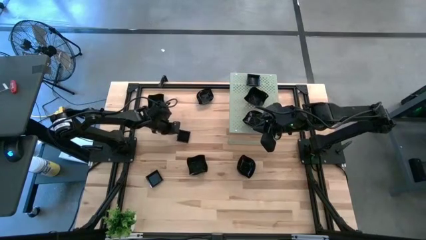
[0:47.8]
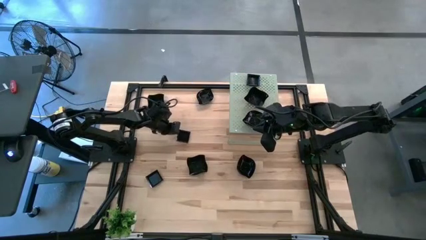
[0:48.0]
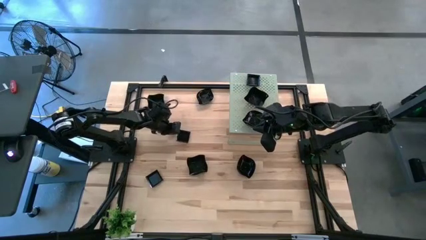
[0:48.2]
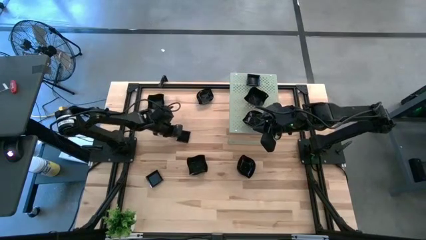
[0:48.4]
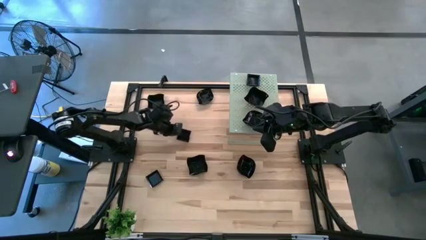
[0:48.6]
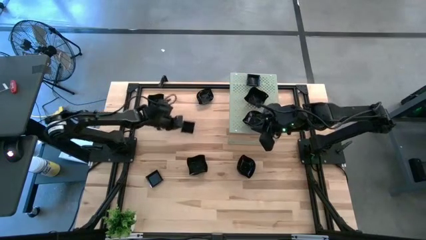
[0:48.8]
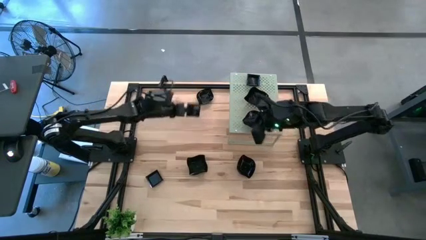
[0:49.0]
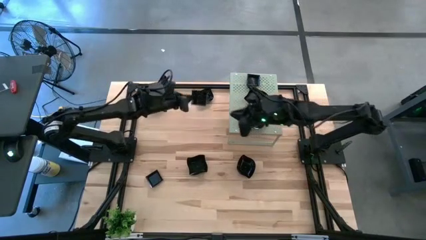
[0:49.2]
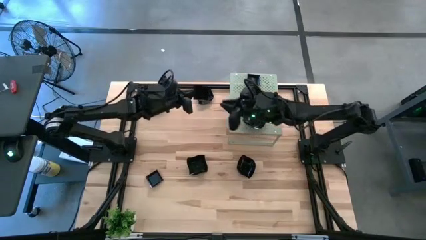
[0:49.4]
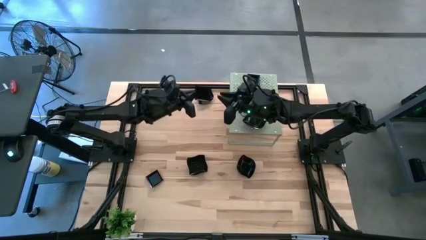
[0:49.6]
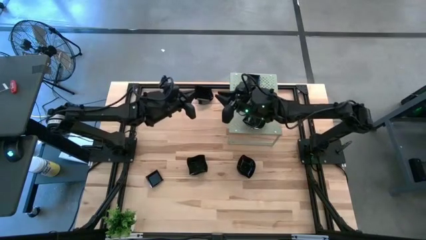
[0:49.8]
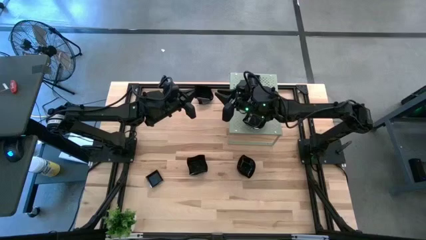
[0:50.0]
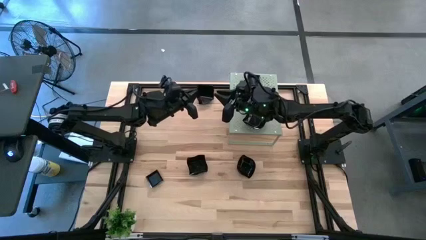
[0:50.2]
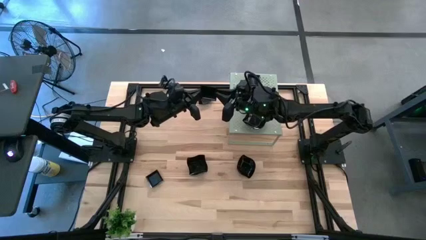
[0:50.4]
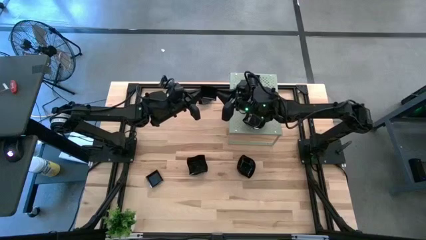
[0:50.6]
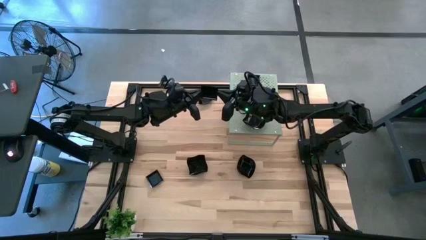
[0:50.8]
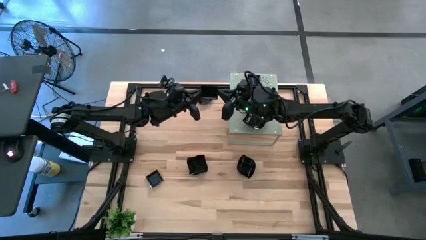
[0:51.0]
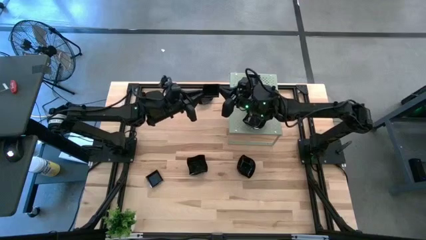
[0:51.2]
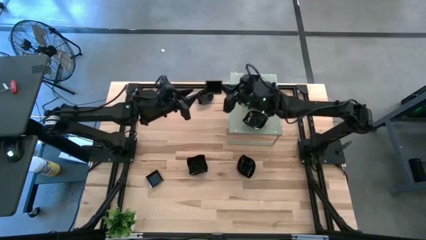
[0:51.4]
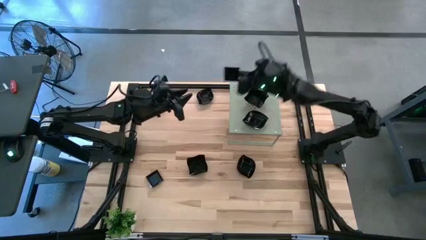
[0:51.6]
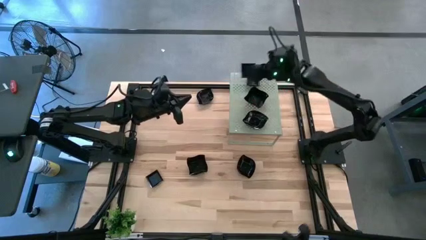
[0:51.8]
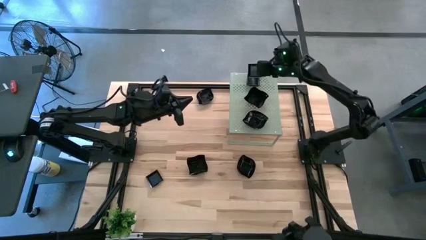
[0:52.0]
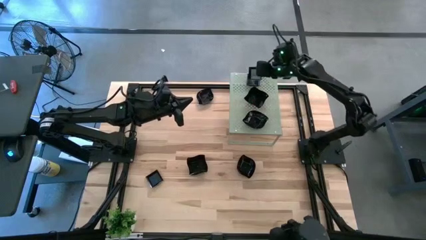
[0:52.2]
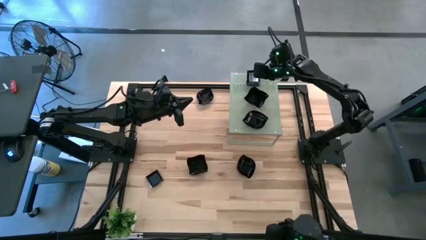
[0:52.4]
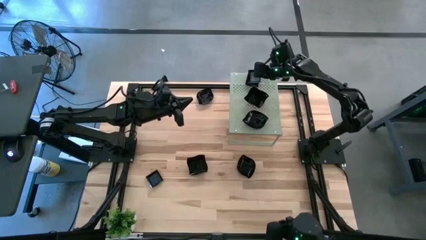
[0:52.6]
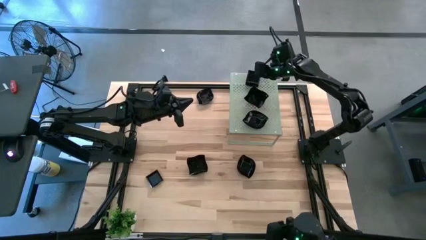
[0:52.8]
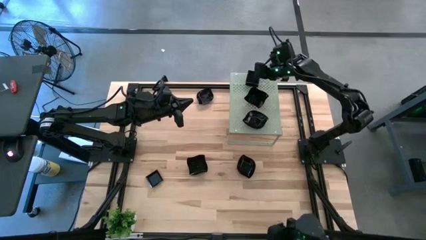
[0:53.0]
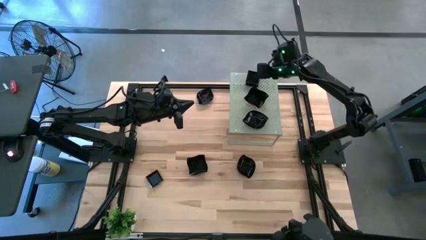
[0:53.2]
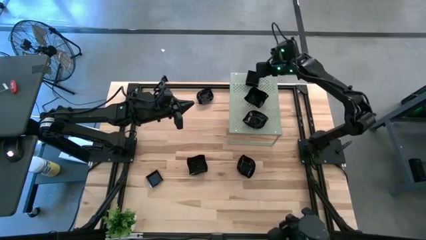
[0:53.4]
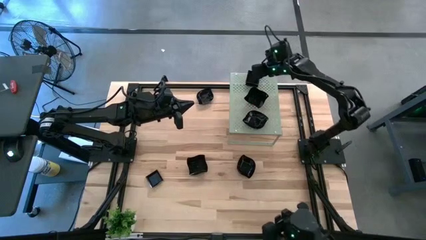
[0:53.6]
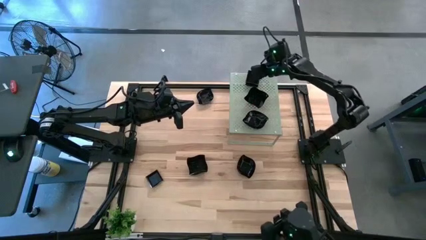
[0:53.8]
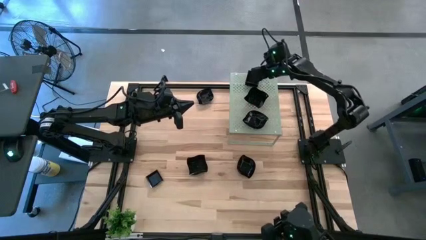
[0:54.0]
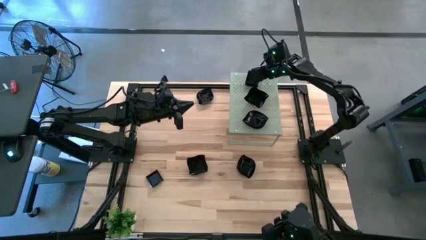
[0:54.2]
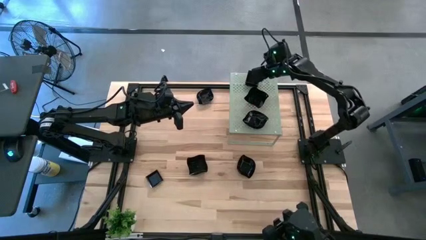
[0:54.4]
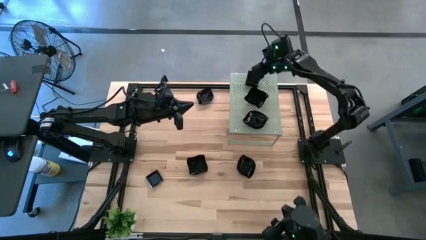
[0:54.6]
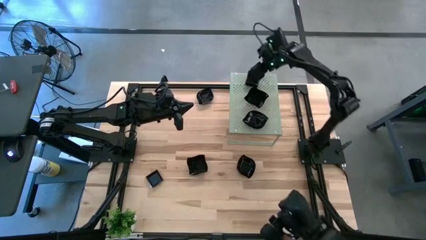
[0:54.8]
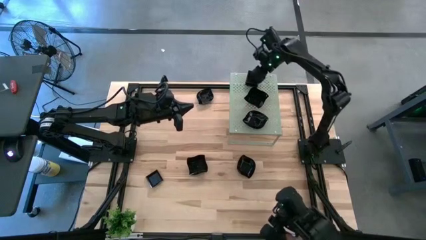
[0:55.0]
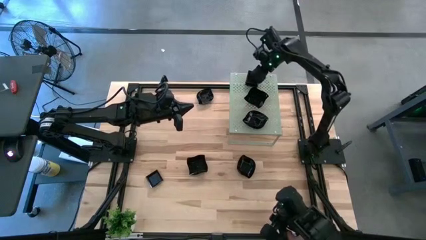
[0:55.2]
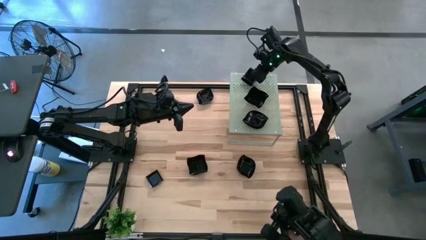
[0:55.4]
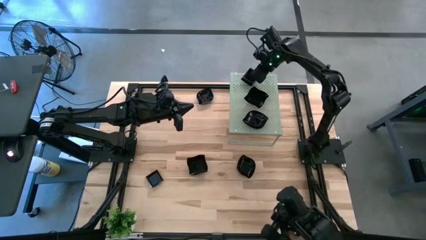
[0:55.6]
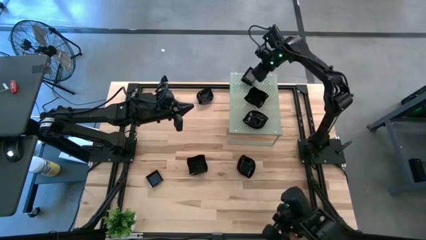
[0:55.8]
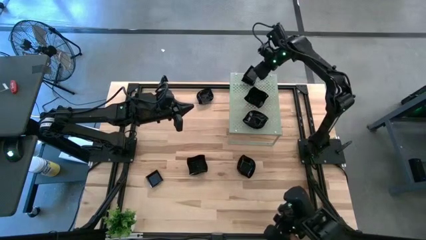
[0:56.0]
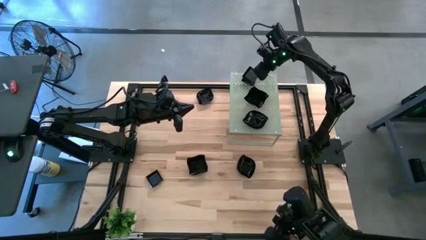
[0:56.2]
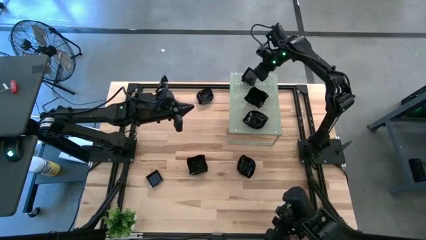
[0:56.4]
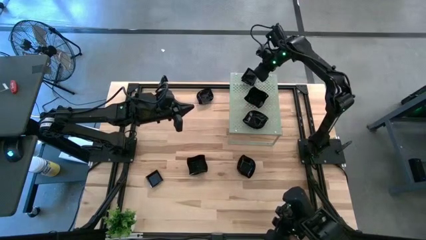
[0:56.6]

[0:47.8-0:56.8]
Task: Pick & Place Mini shaped plates
Stack the black square plate on the black square plate on the shelf

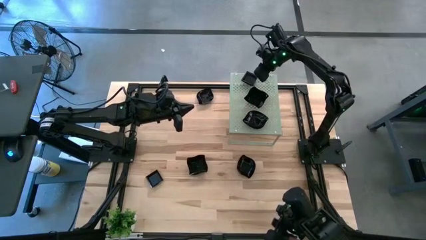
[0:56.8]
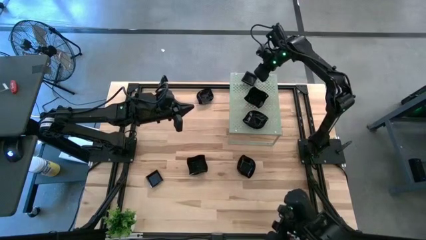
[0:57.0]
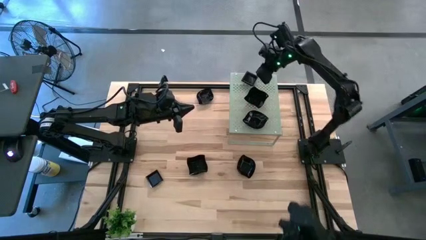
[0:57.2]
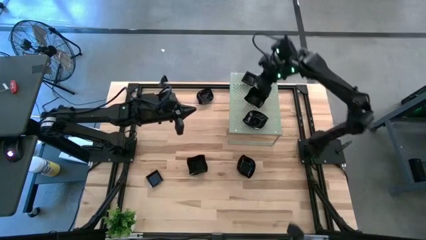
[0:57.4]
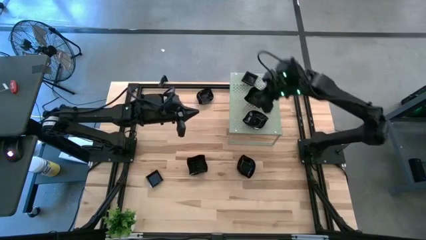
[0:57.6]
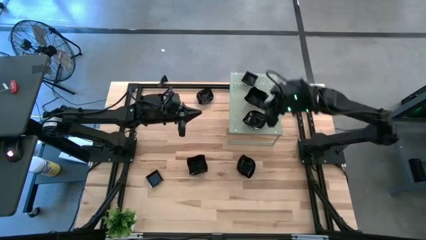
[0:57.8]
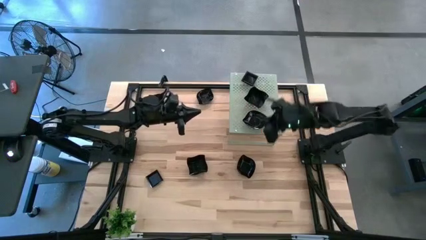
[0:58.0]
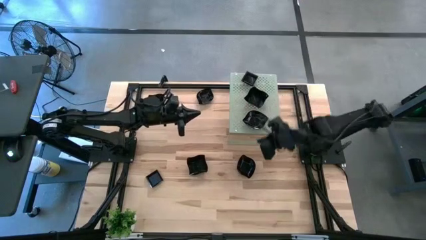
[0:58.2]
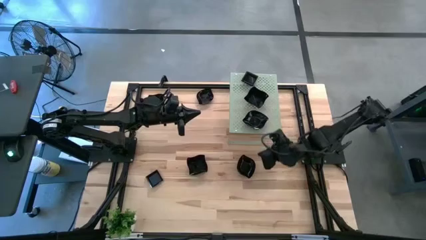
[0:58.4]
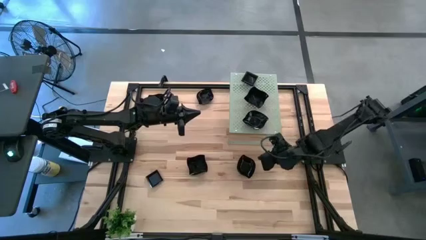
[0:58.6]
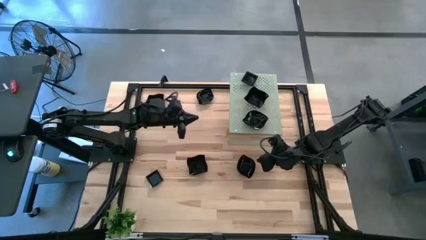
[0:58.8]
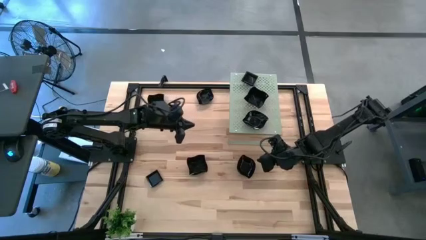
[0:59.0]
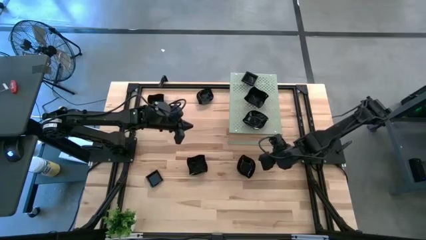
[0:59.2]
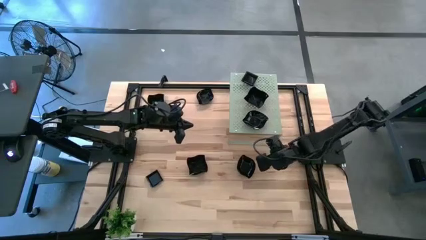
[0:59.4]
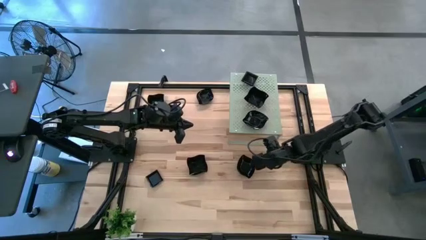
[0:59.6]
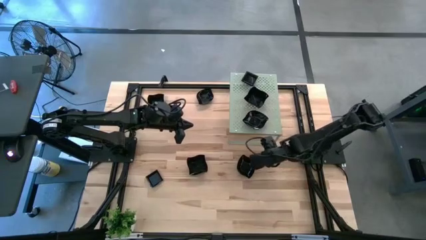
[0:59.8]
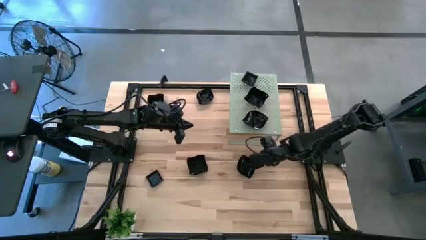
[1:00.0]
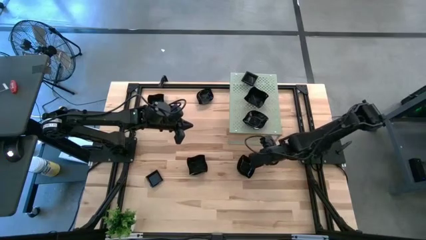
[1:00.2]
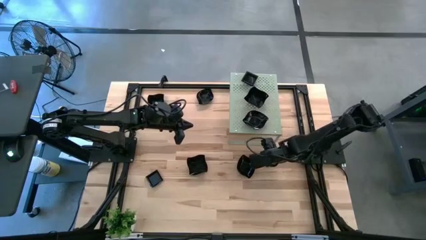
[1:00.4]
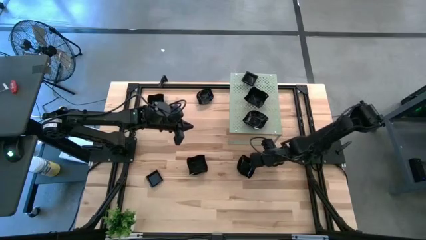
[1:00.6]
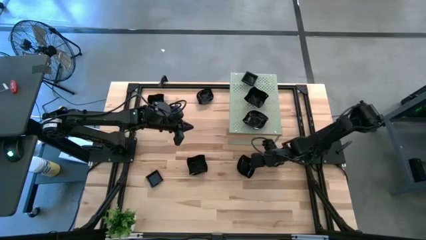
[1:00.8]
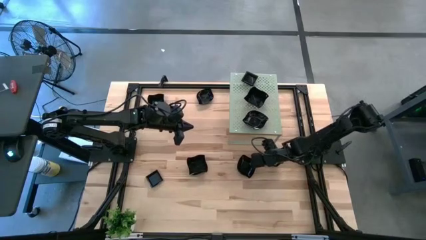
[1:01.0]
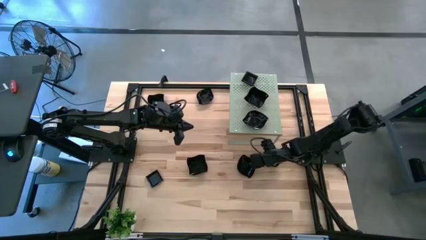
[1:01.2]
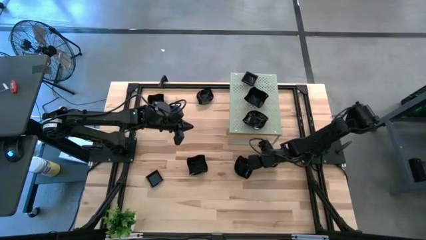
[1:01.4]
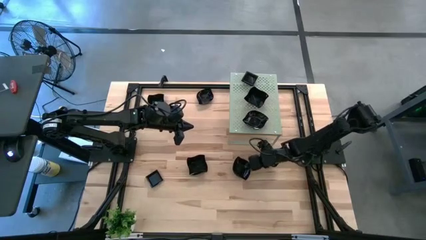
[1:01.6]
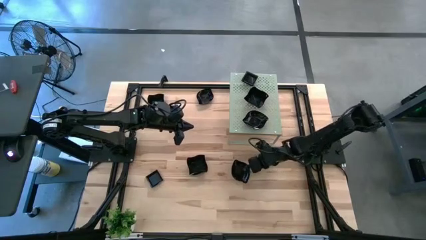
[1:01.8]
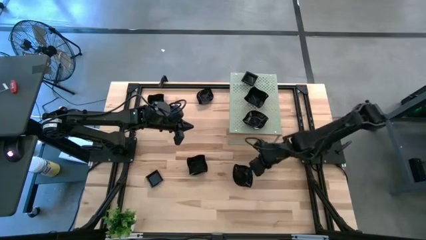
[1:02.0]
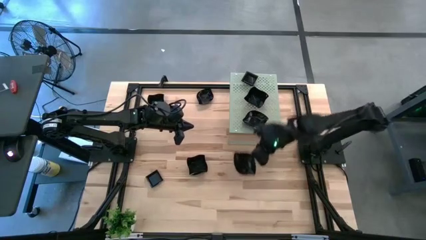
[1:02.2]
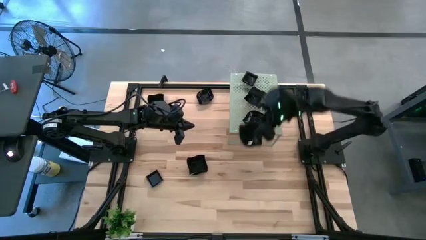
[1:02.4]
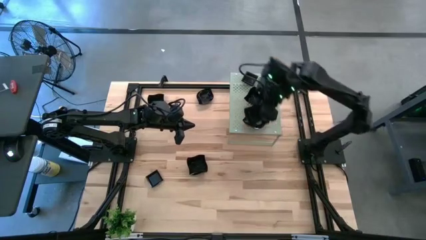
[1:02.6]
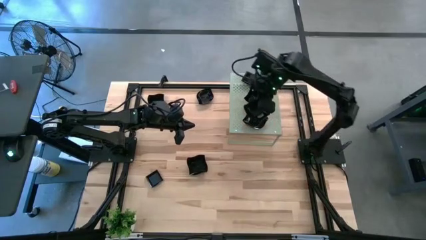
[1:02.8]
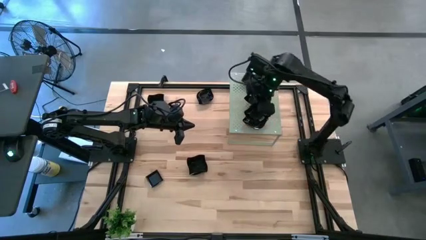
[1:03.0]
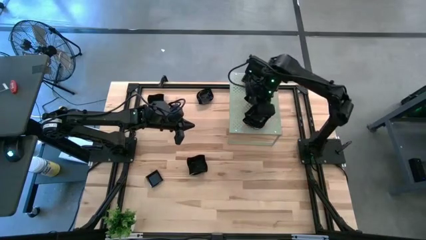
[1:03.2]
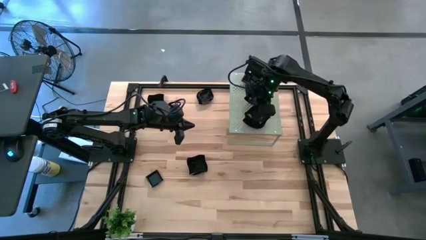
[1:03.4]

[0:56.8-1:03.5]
Stack the black leaf-shaped plate on the black leaf-shaped plate on the shelf

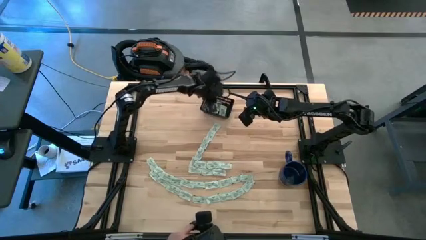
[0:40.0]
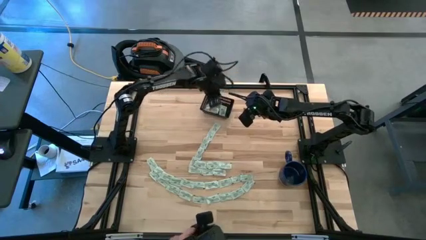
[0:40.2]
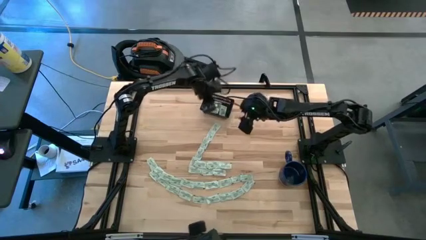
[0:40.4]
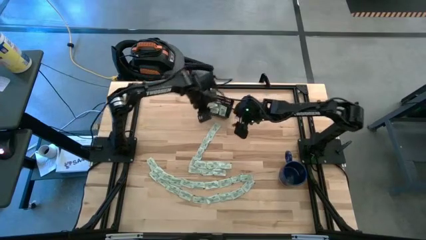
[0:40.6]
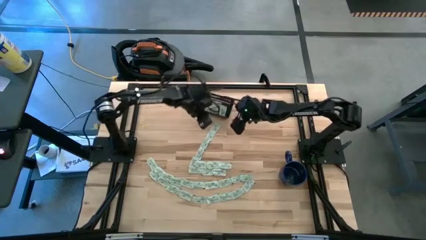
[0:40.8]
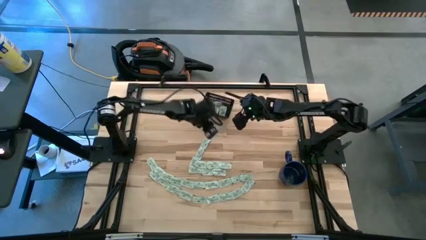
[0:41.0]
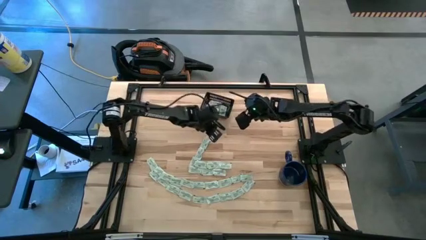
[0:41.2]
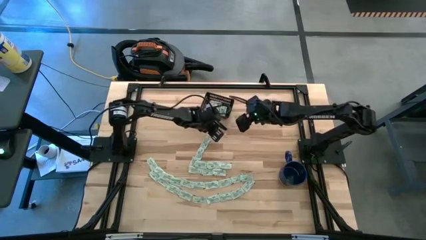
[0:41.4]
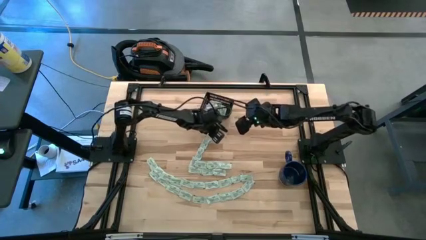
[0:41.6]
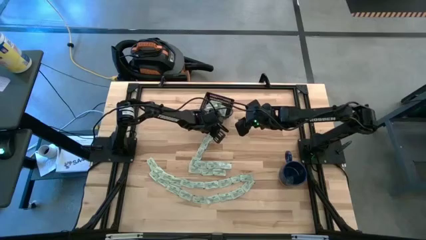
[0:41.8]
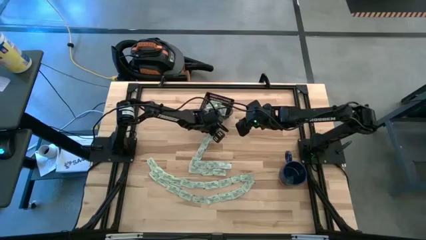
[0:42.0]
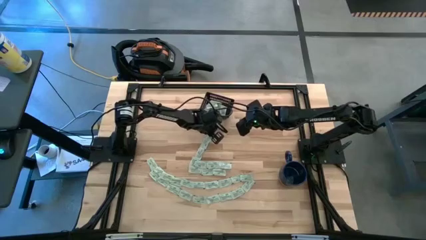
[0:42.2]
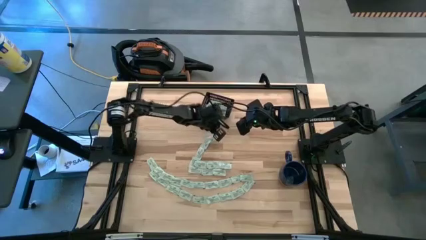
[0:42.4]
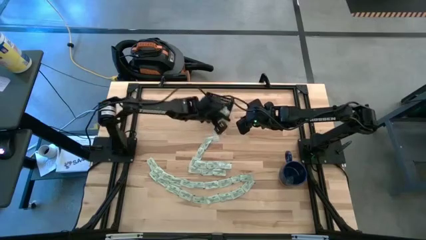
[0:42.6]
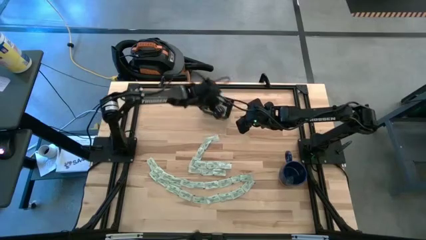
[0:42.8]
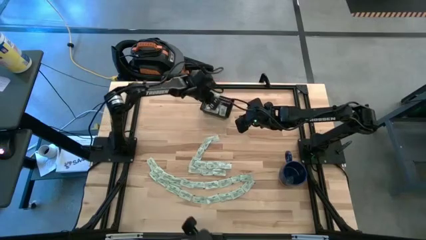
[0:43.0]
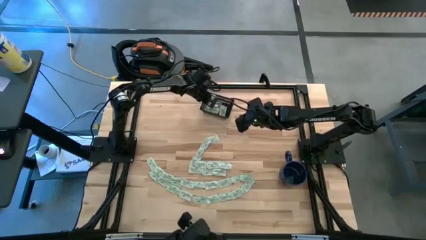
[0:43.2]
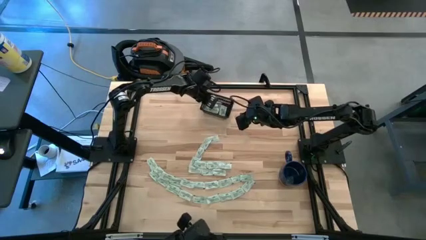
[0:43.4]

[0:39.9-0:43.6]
Task: Pick and place Stevia / Truvia into bins
Put the stevia packet into the black bin
